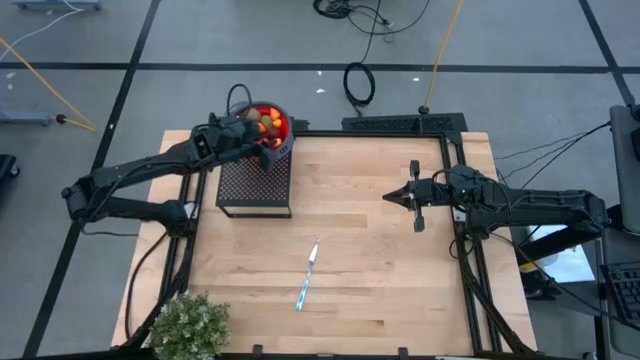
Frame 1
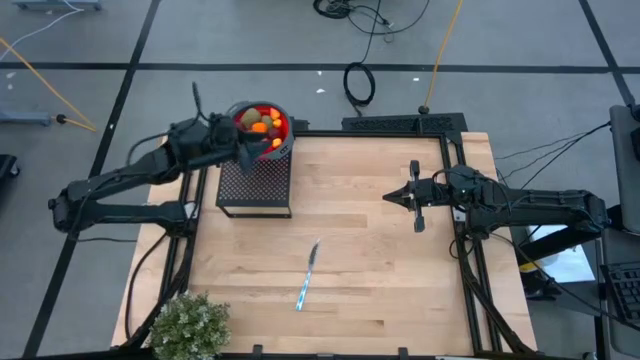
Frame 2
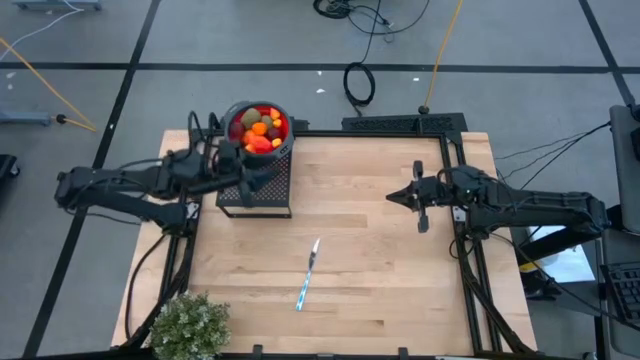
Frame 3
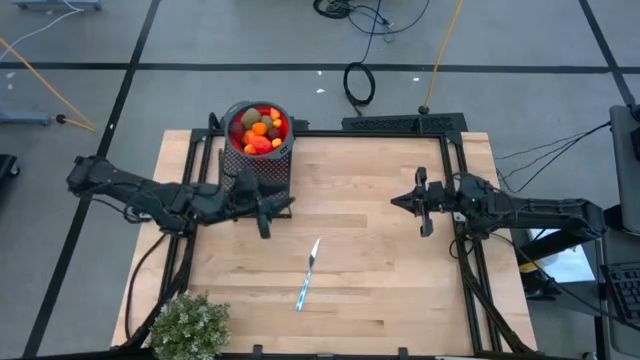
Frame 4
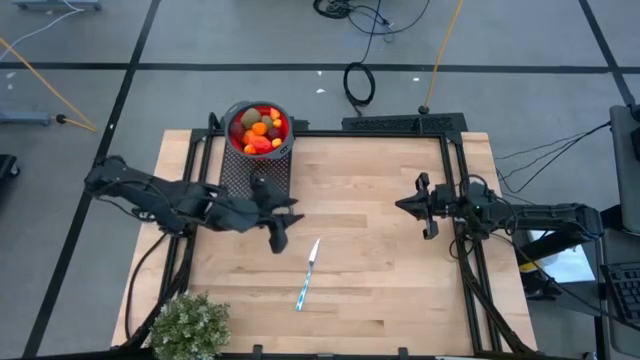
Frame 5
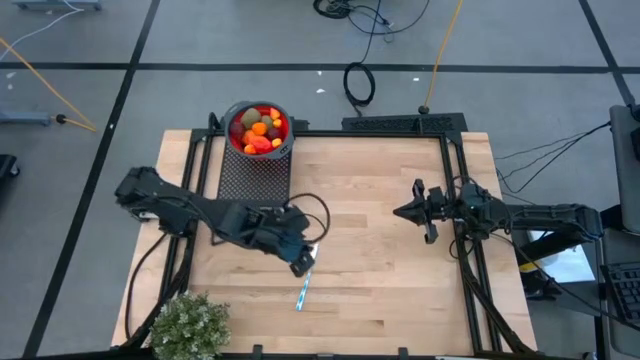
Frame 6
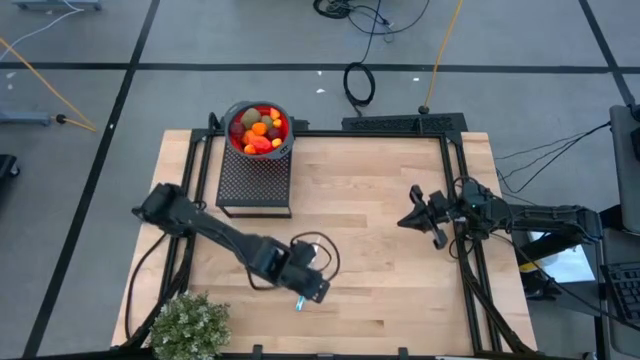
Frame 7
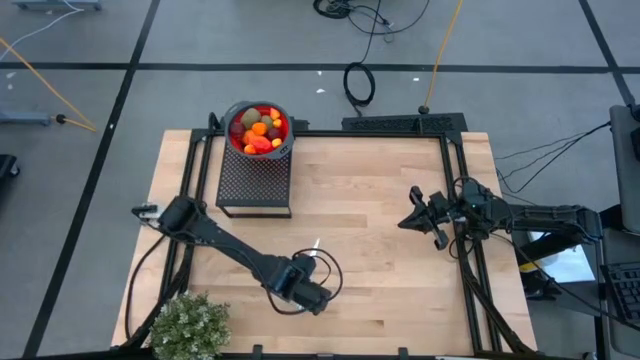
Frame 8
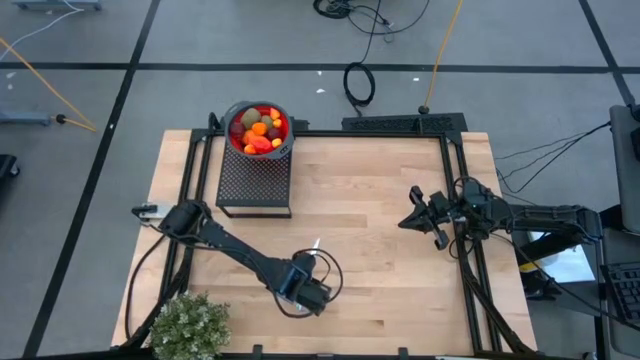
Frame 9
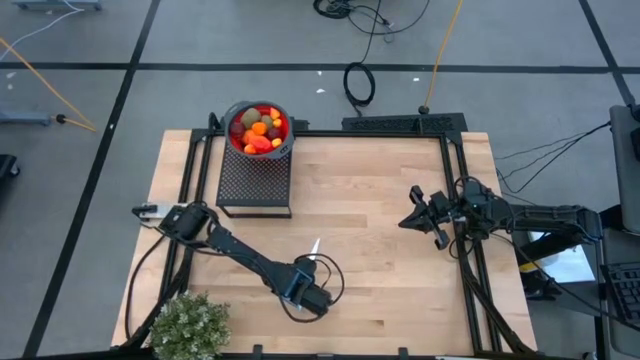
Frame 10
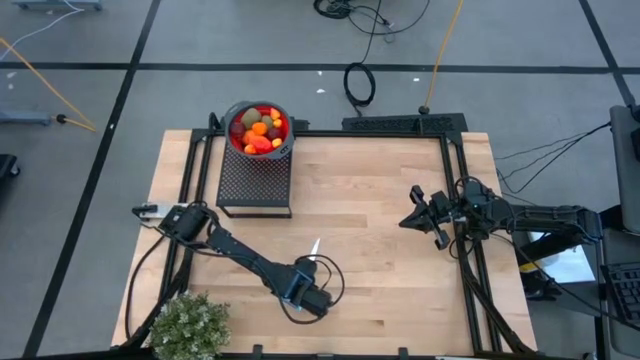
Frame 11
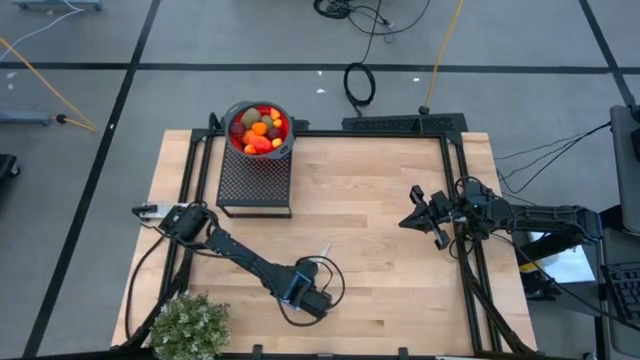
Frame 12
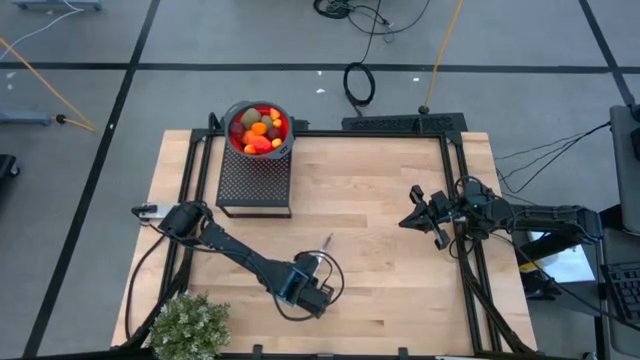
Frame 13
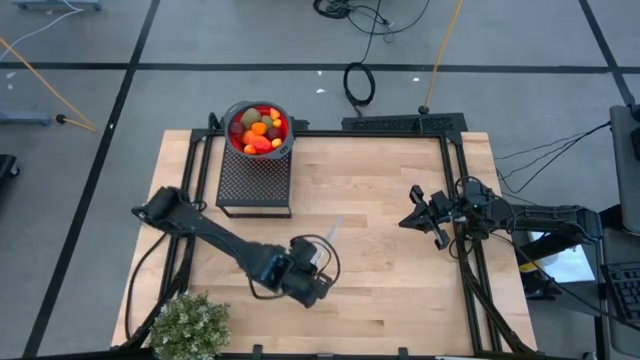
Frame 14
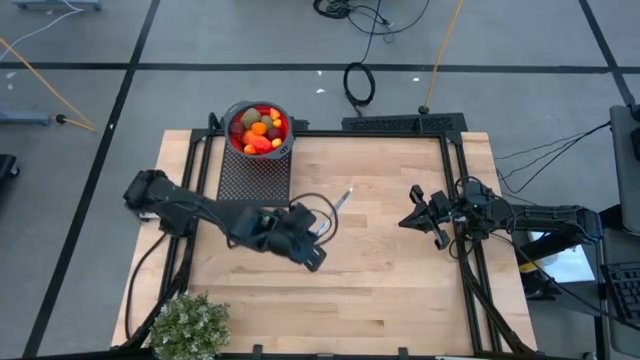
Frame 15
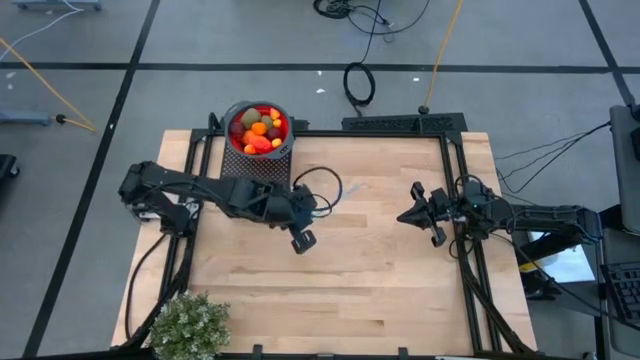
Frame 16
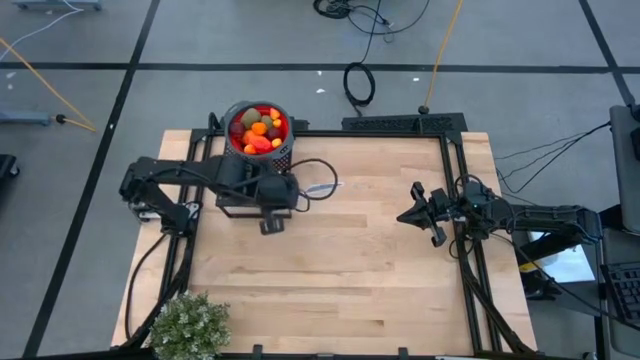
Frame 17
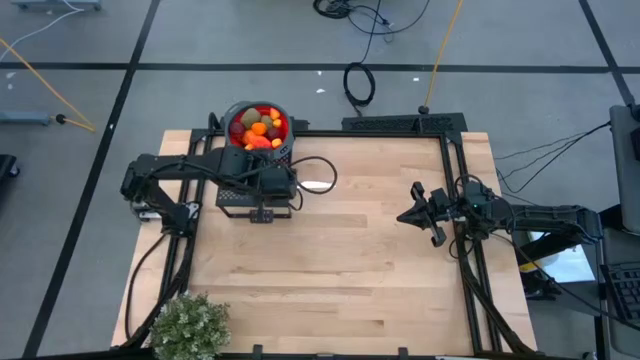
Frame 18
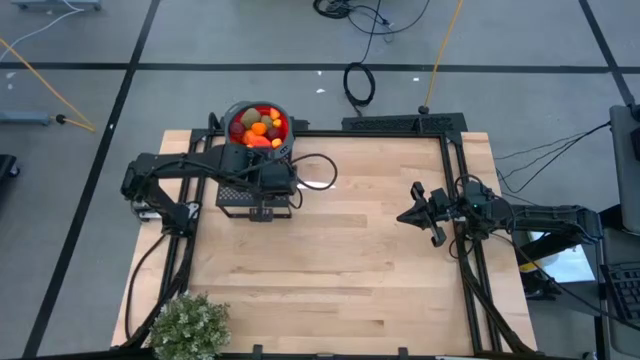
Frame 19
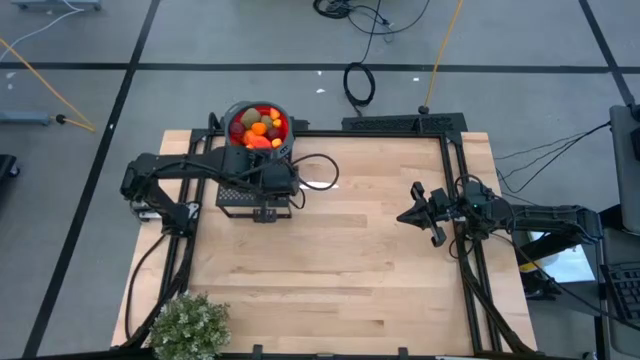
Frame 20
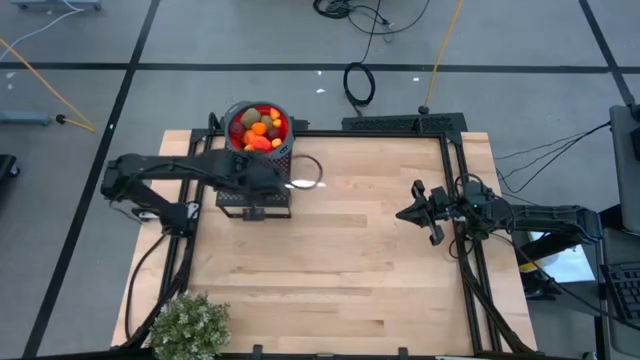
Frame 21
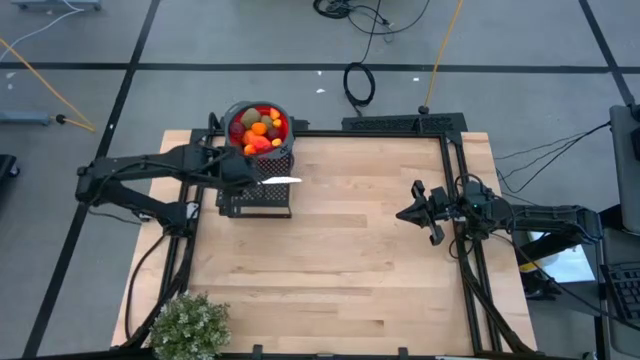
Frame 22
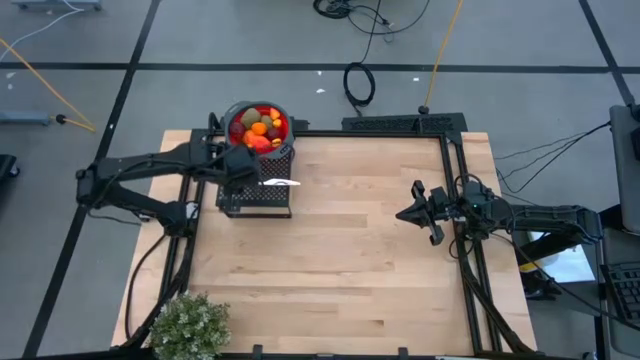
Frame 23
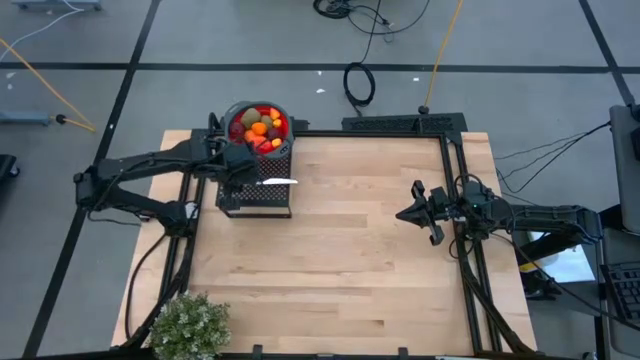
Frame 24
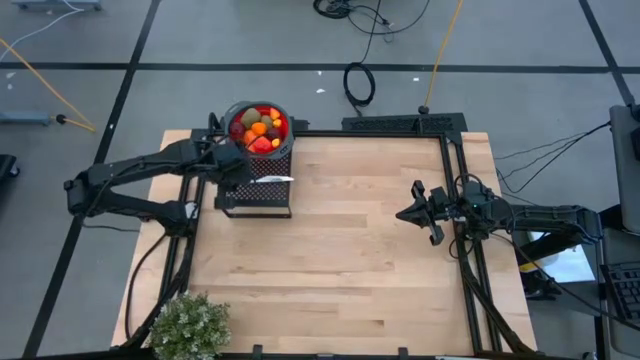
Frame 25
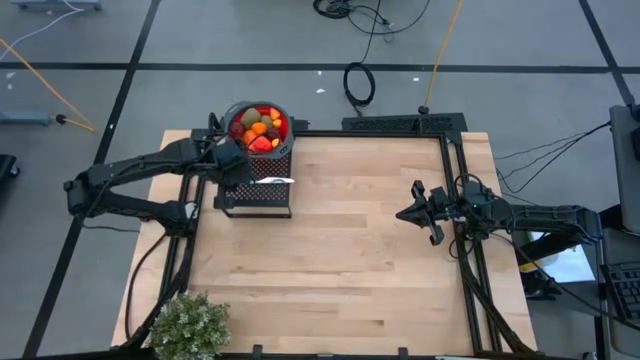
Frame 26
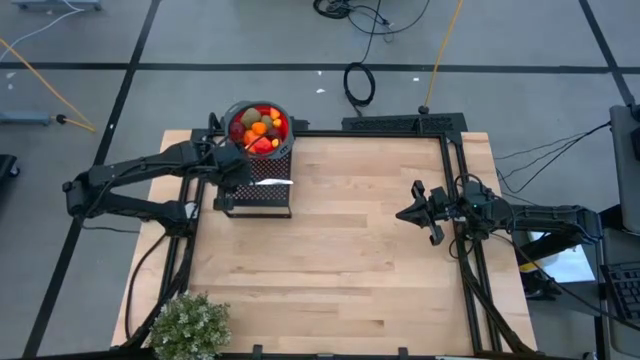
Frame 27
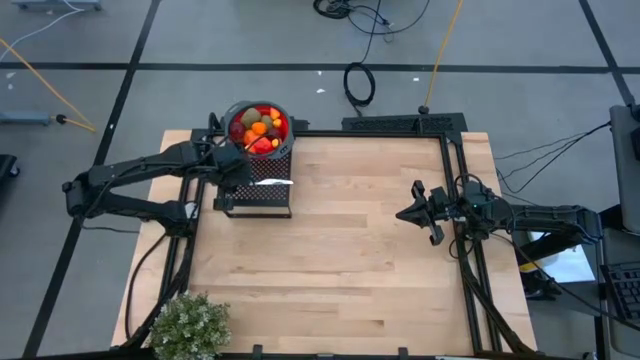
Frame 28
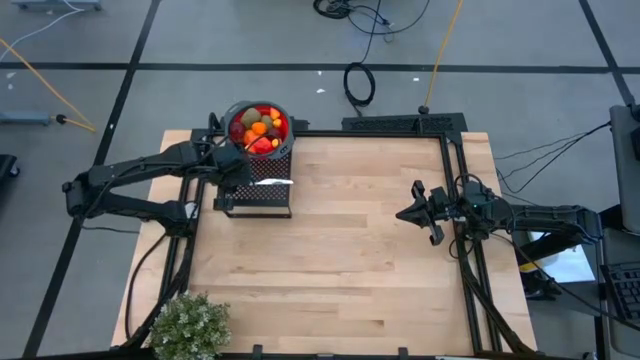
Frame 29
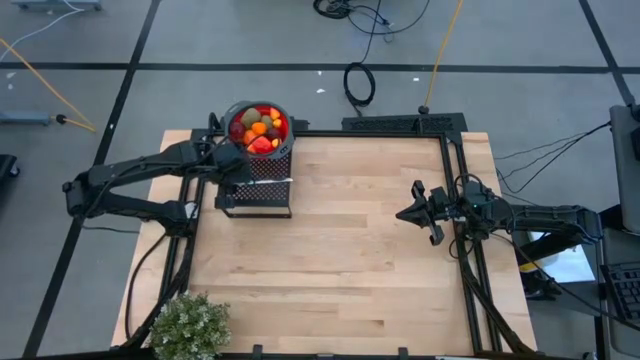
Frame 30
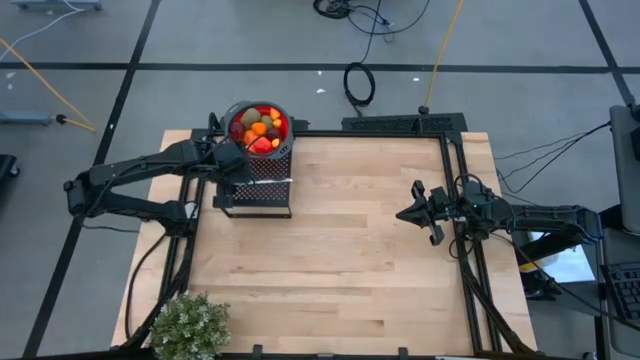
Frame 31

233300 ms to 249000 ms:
Task: Pick & Place Fruit
Put the blue patterned knife on the shelf

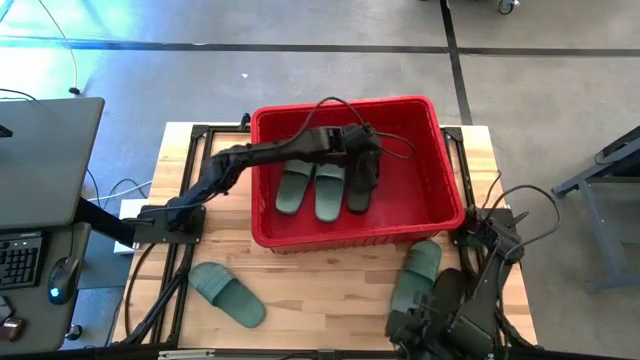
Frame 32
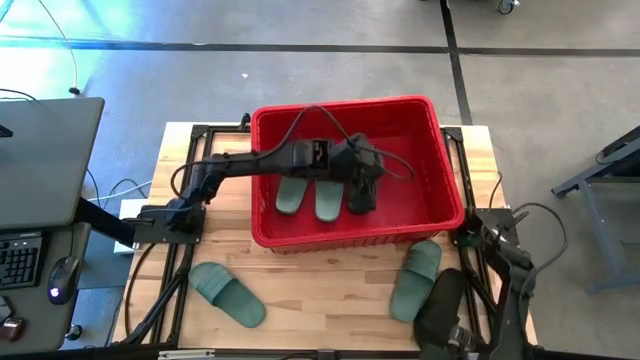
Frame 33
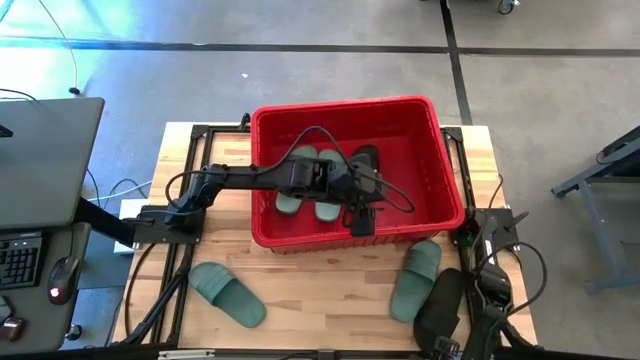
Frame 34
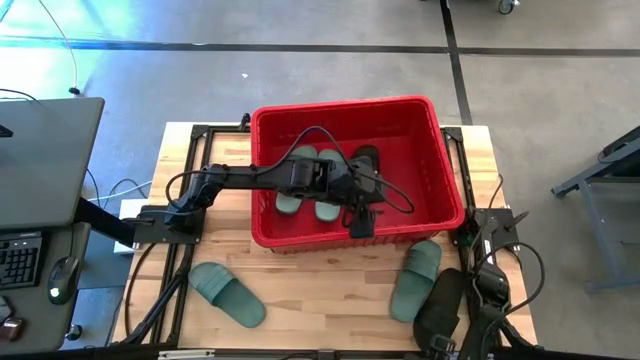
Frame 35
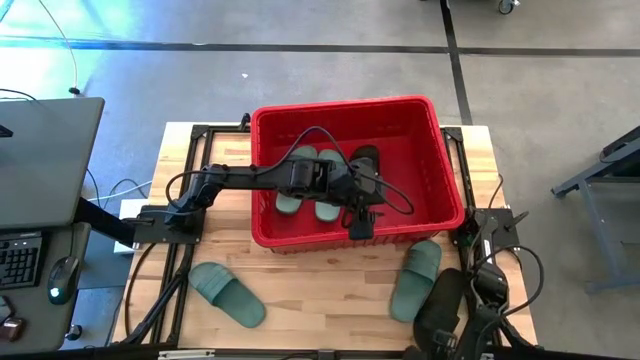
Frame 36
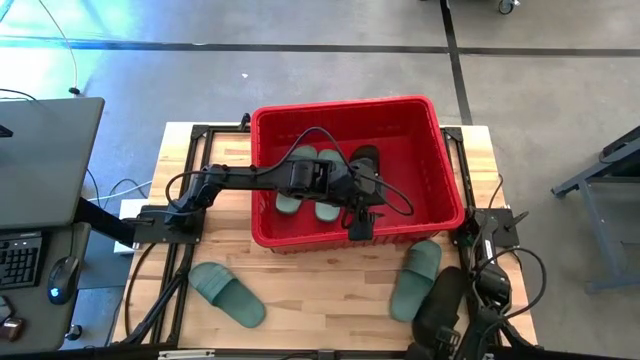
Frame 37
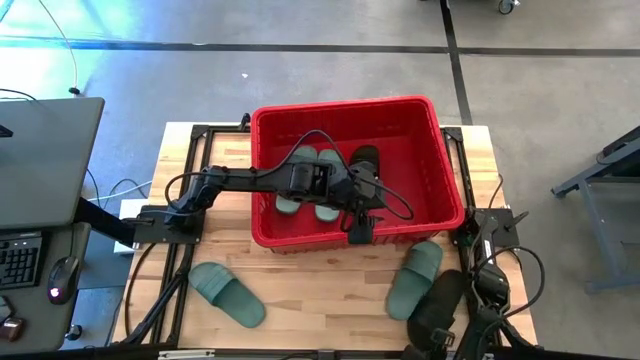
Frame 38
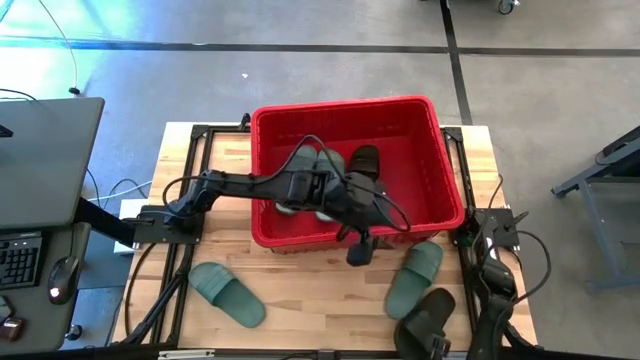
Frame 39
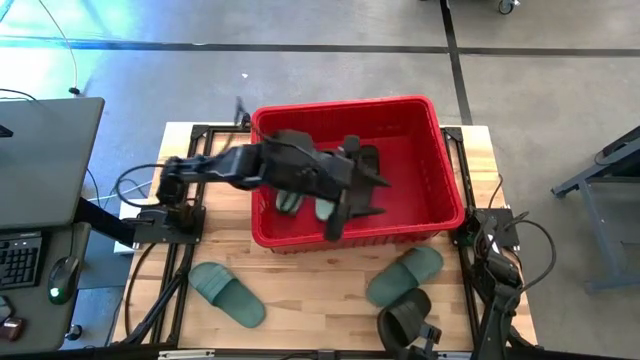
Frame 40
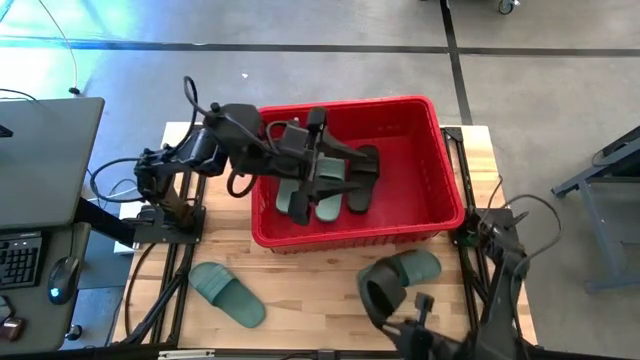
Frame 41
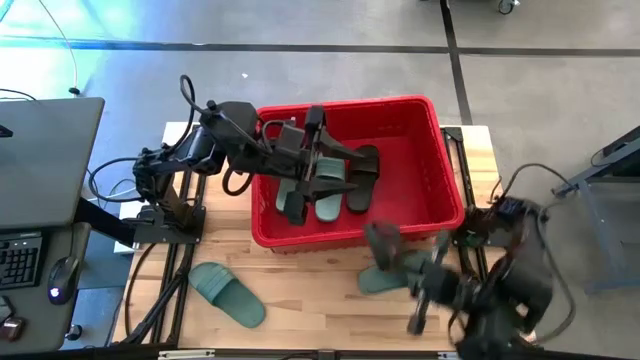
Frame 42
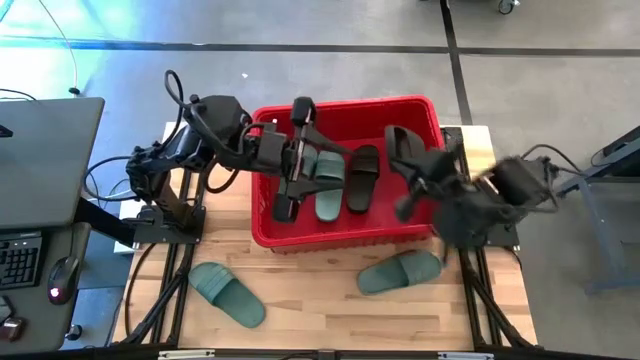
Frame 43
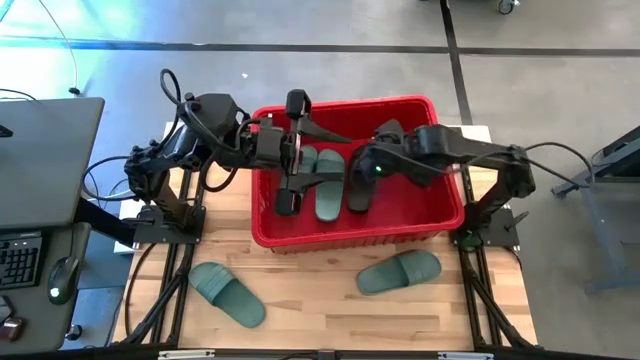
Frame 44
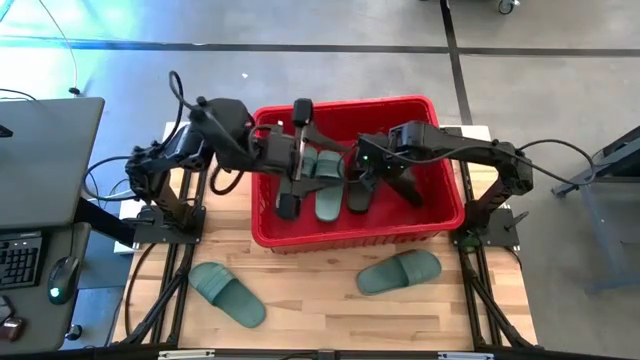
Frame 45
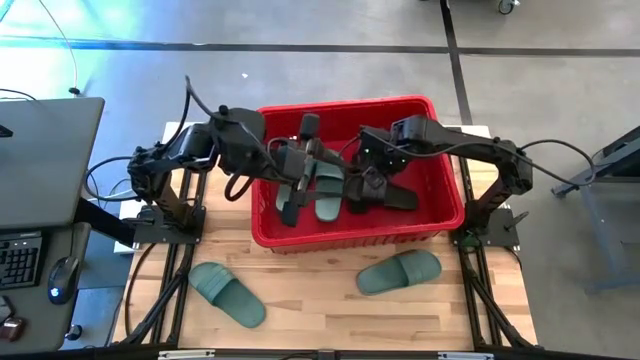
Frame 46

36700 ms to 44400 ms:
Task: Pick and place slides into bin
Put the black slipper into the red bin
